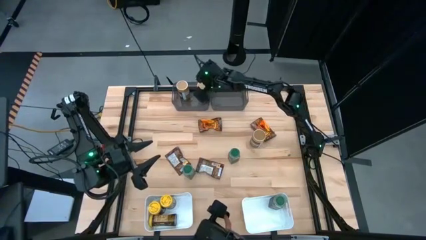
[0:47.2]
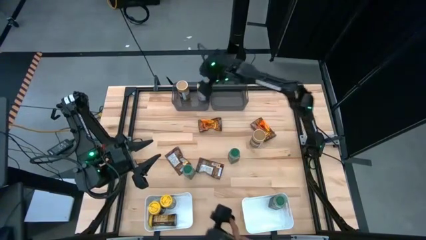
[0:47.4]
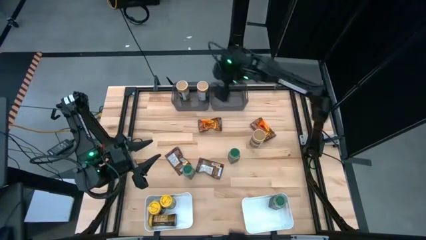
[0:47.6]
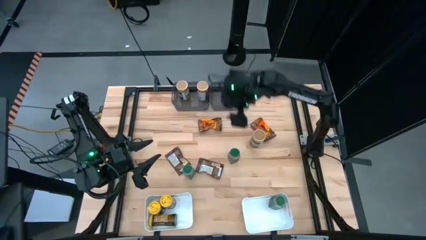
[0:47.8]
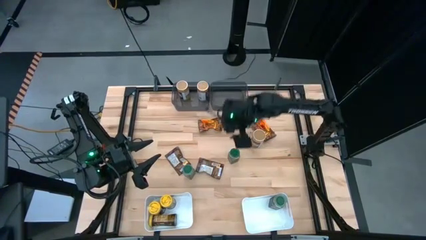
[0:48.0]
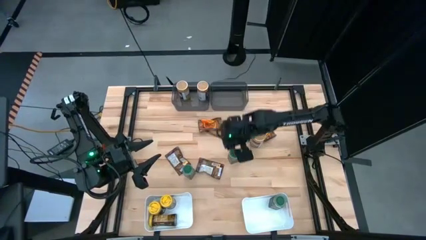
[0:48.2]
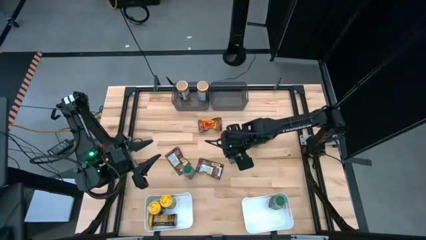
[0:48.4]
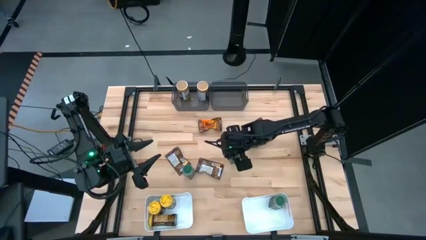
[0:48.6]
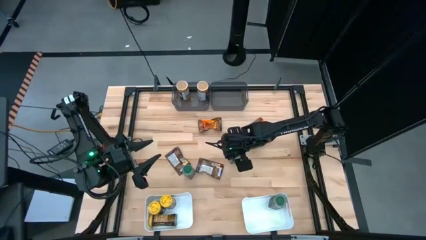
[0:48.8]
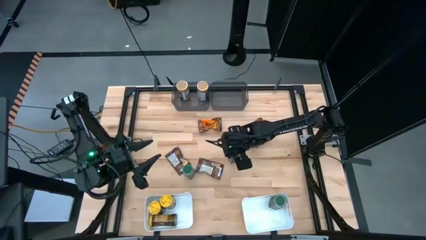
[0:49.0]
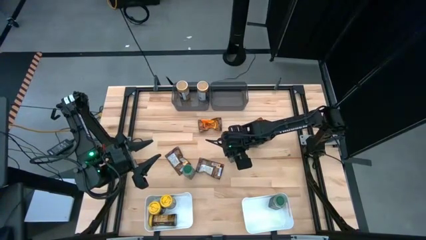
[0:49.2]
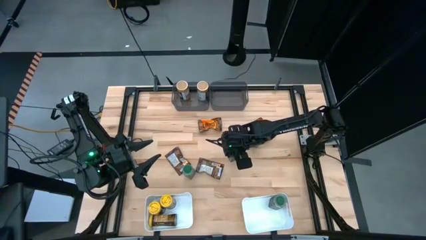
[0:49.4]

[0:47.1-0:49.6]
Task: Sort spices by type
Put the top green seasoning bottle into the bottom right white bin

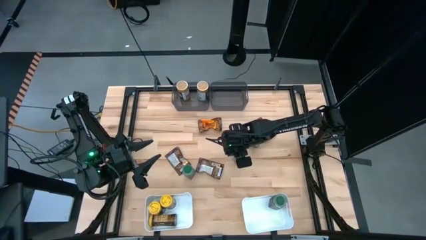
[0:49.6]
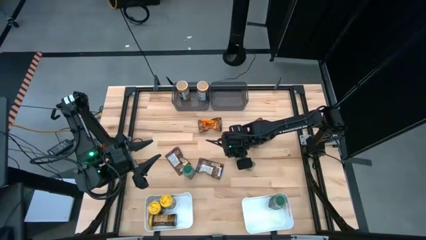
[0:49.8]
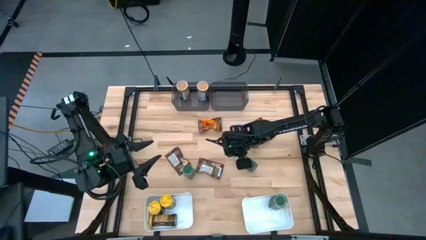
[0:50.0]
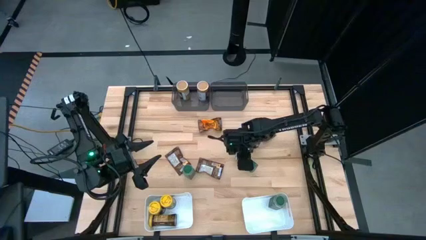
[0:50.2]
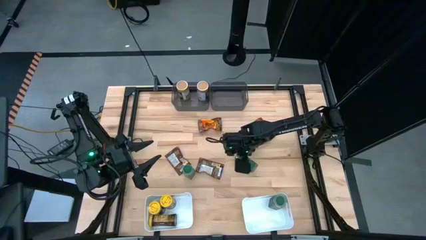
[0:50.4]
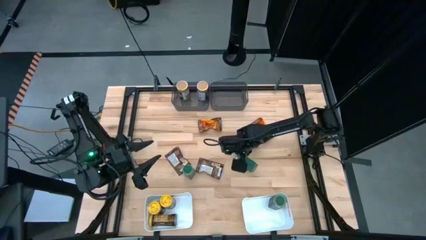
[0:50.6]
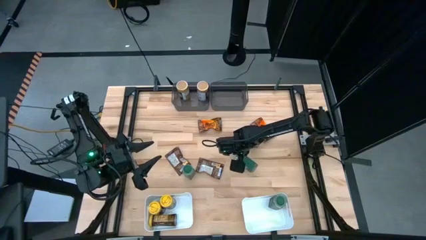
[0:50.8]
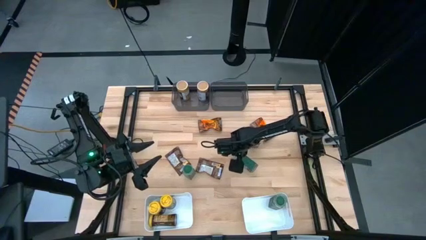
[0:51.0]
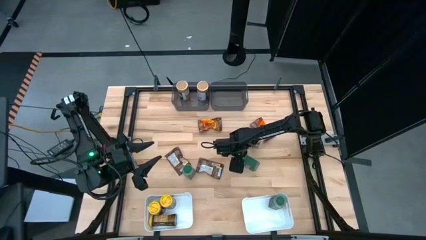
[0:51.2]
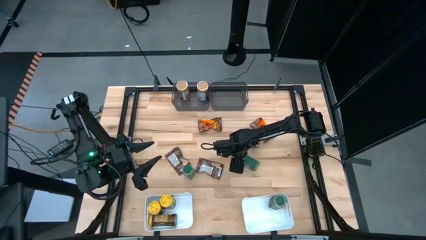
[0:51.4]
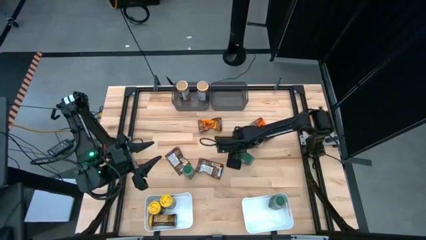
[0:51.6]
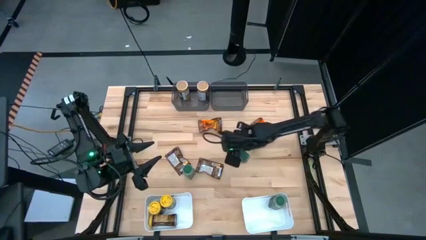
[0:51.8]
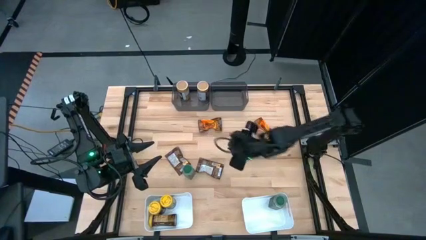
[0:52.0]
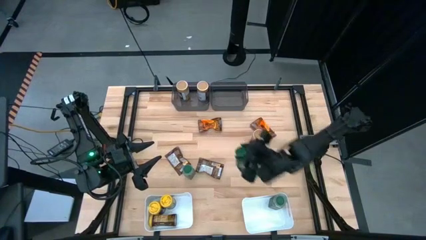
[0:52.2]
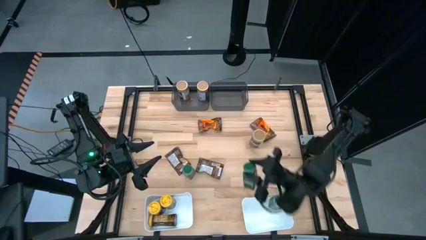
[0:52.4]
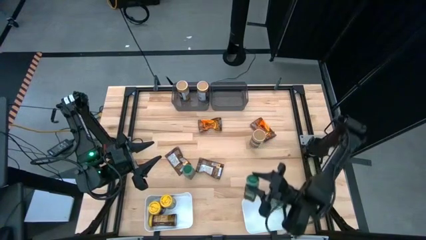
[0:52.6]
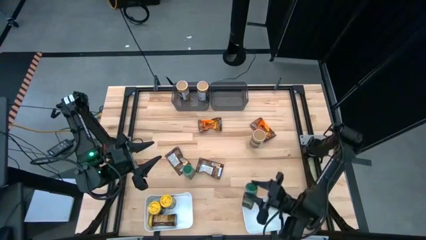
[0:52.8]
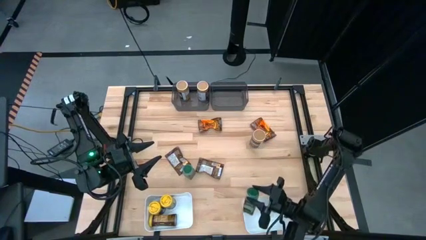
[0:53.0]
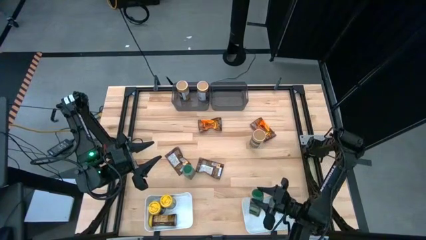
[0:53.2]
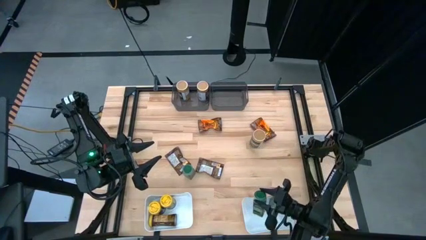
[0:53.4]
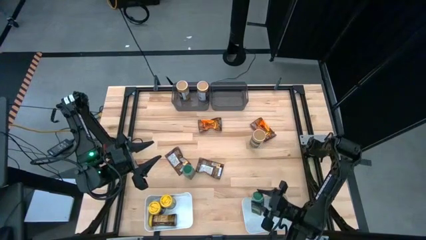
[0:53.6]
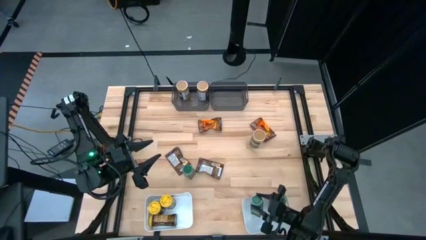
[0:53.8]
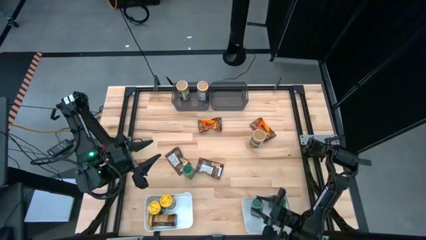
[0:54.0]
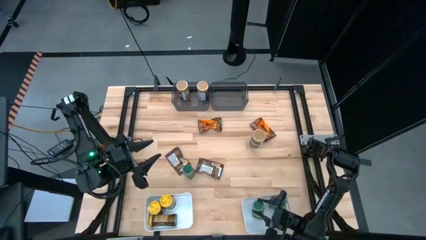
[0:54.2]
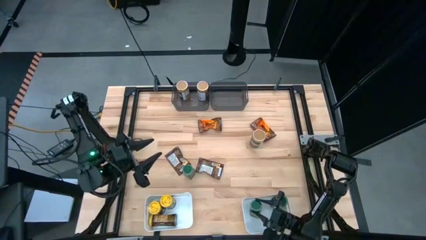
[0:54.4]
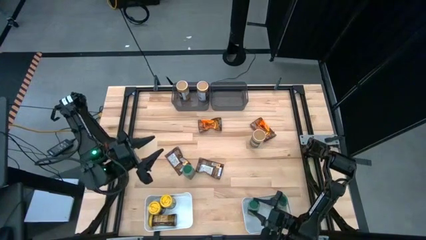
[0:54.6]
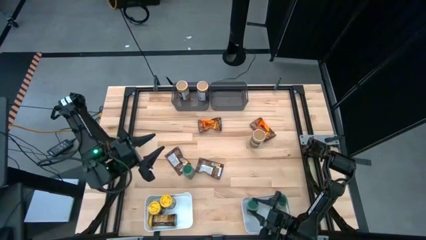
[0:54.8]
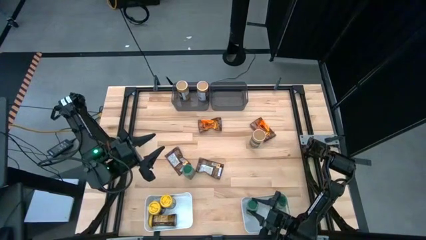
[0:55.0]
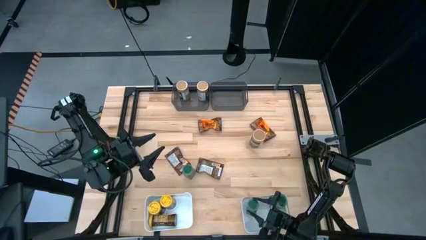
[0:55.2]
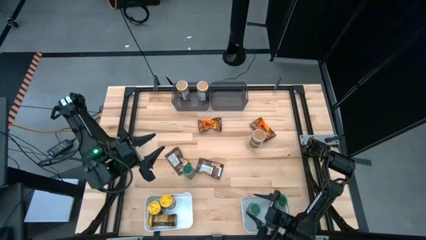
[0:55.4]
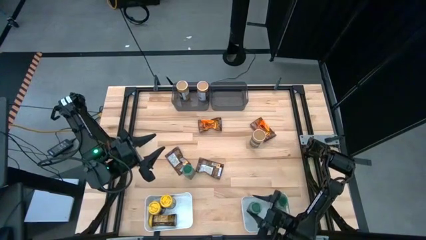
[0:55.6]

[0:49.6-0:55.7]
Put the top green seasoning bottle into the bottom right white bin

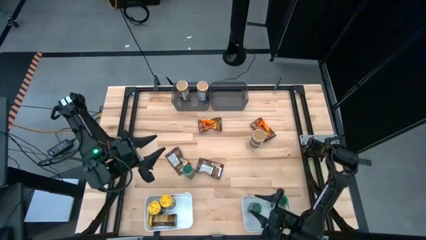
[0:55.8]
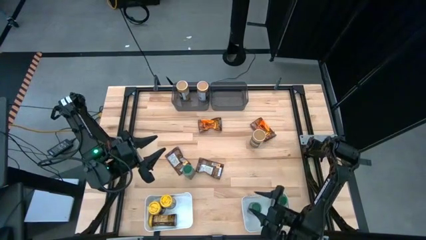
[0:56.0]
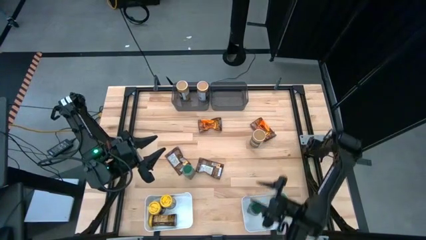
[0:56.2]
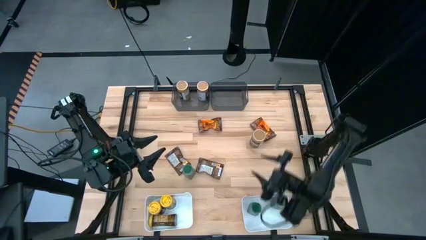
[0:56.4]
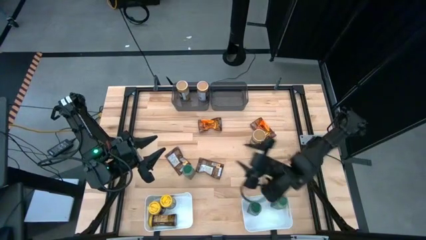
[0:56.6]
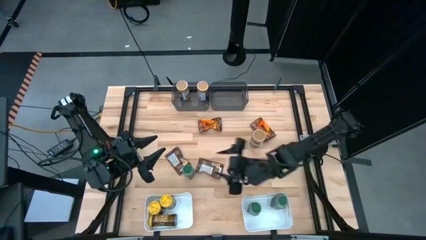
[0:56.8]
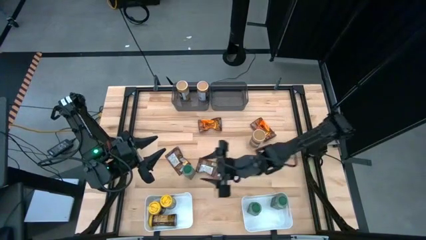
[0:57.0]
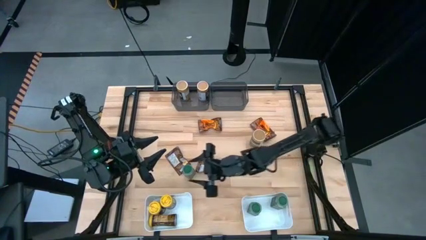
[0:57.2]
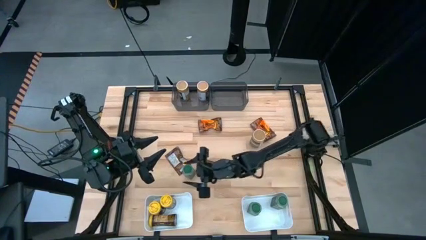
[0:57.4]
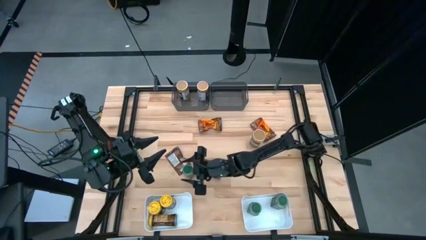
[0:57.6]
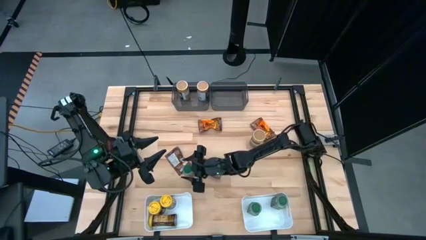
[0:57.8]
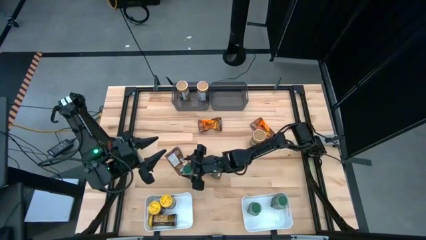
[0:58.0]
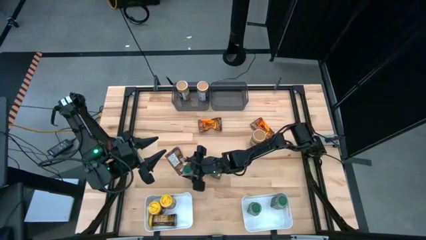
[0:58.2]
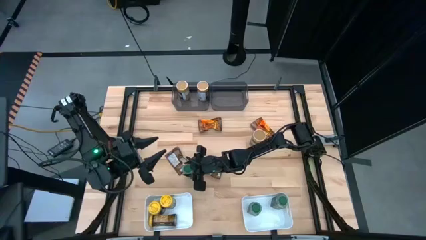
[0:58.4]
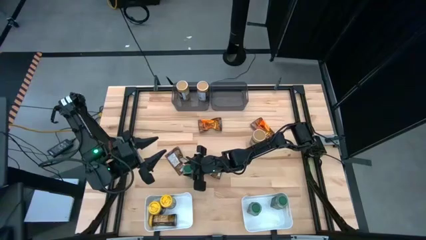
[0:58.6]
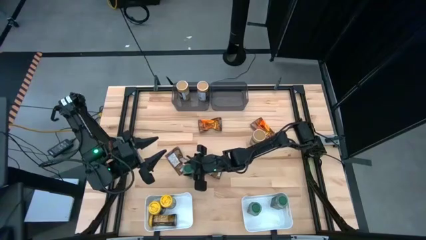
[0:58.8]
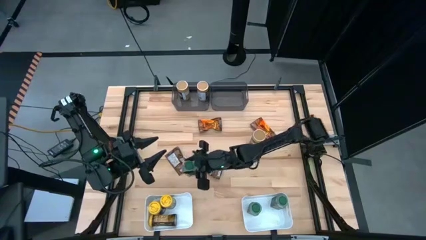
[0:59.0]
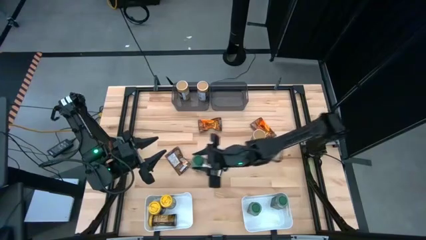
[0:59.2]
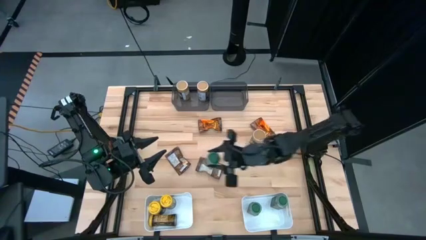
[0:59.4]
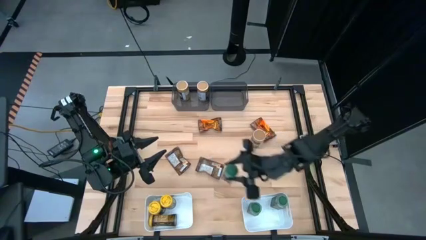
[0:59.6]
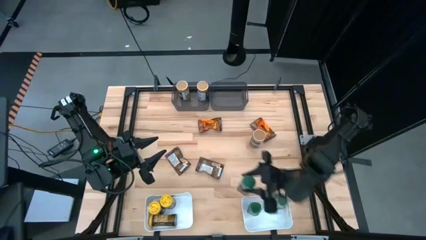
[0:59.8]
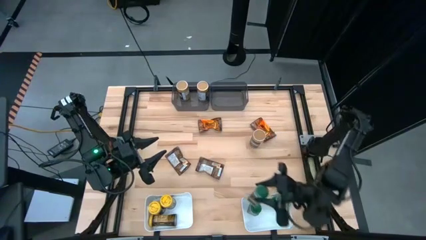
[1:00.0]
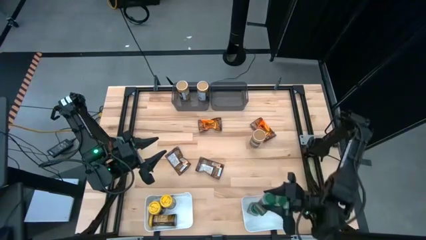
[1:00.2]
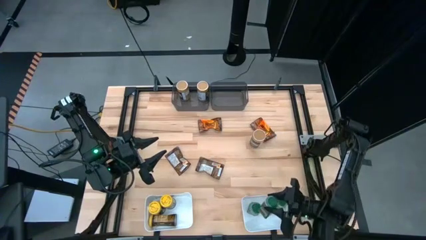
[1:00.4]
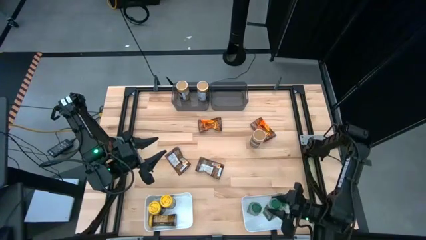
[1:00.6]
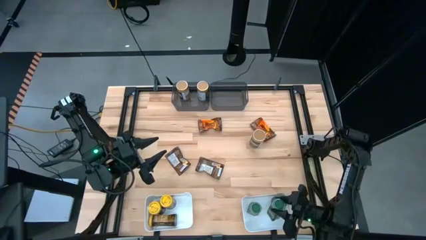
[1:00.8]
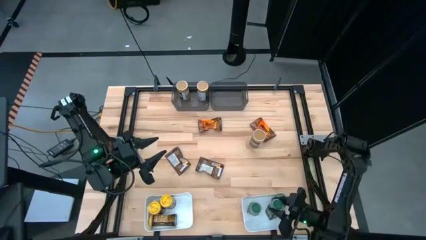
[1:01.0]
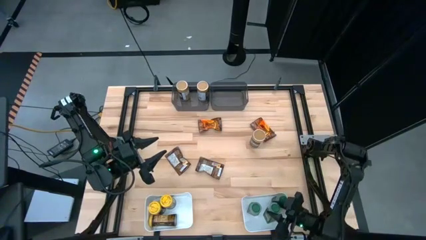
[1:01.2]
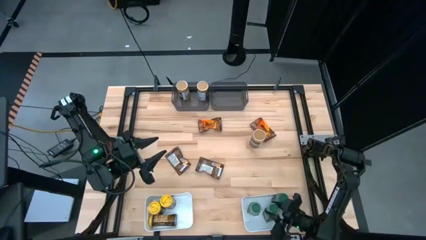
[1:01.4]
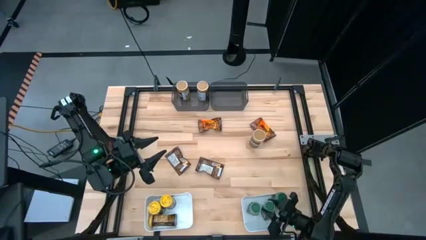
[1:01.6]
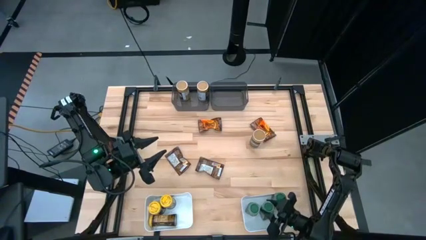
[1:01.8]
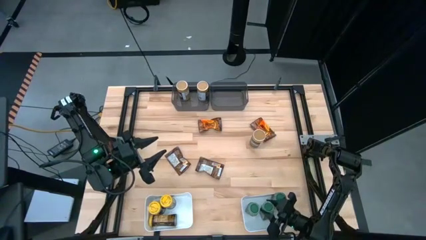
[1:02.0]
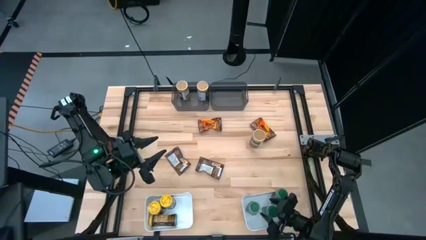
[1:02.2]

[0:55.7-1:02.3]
Put the green seasoning bottle into the bottom right white bin
